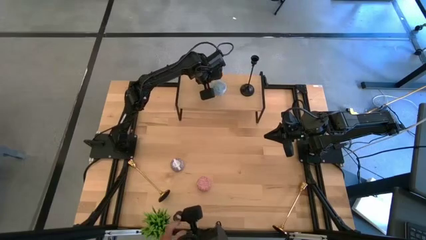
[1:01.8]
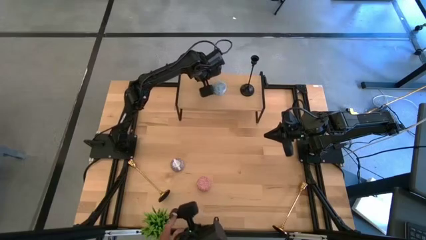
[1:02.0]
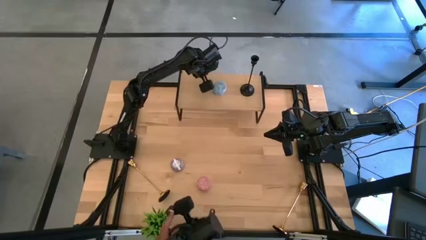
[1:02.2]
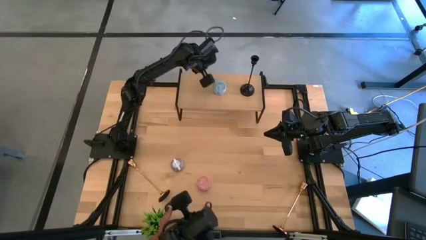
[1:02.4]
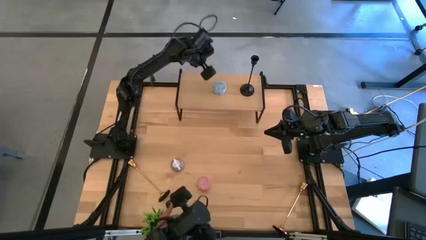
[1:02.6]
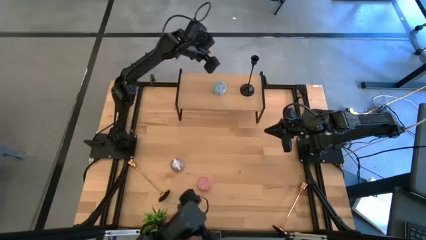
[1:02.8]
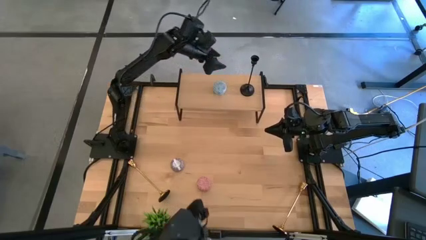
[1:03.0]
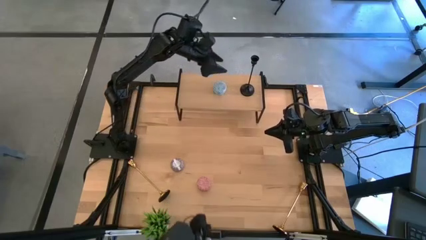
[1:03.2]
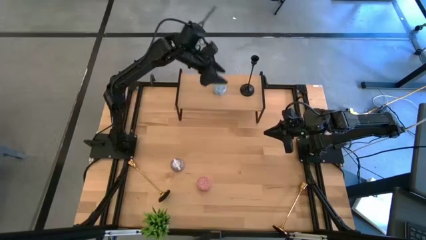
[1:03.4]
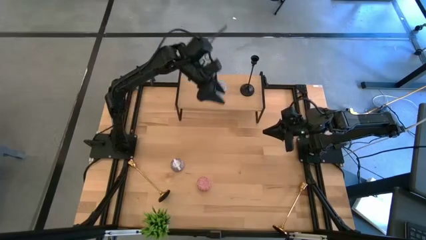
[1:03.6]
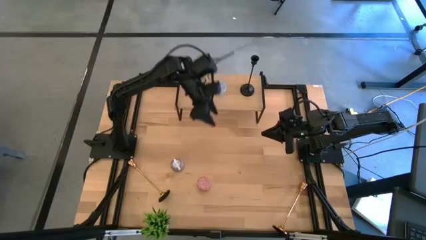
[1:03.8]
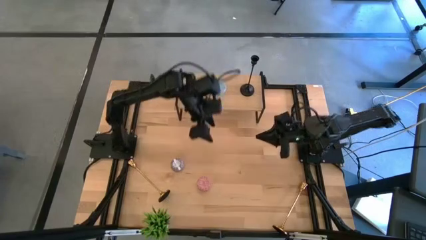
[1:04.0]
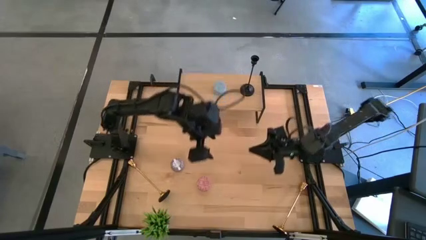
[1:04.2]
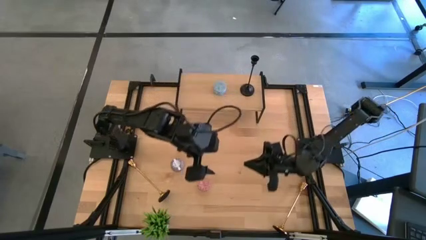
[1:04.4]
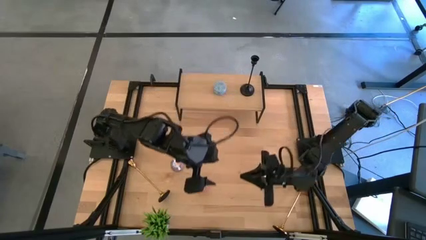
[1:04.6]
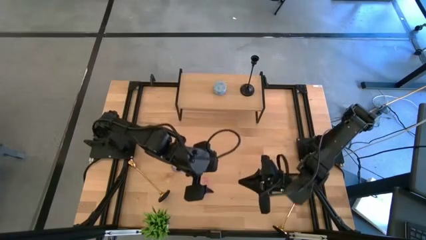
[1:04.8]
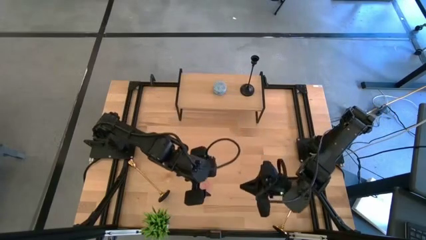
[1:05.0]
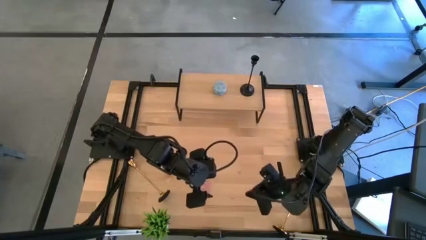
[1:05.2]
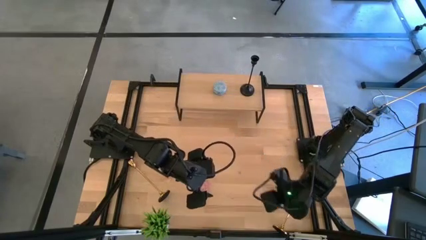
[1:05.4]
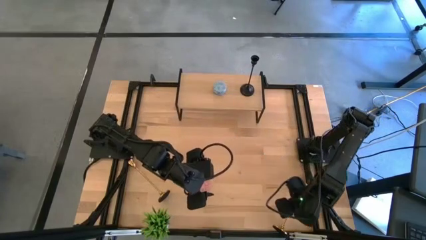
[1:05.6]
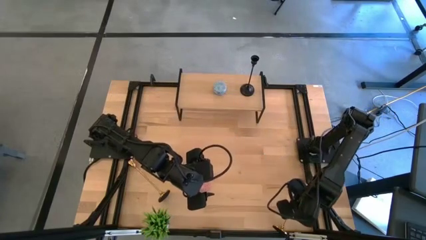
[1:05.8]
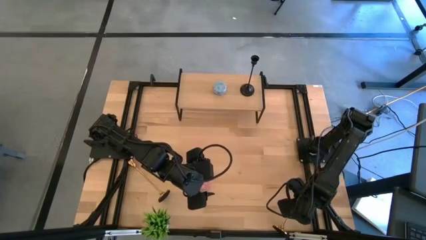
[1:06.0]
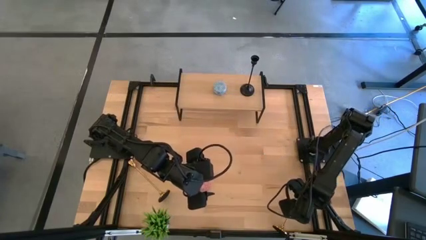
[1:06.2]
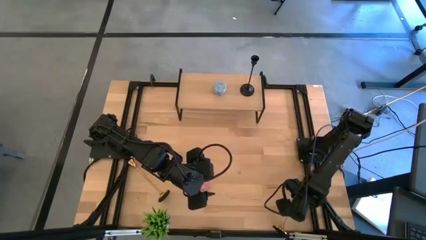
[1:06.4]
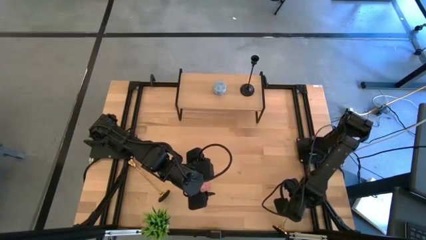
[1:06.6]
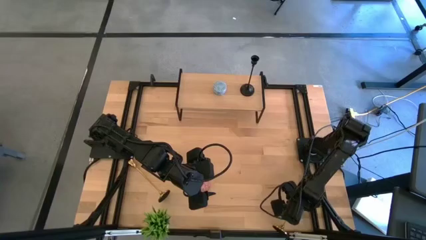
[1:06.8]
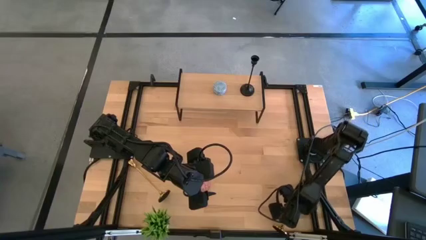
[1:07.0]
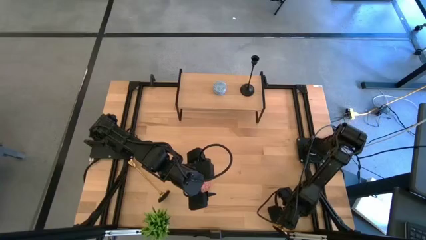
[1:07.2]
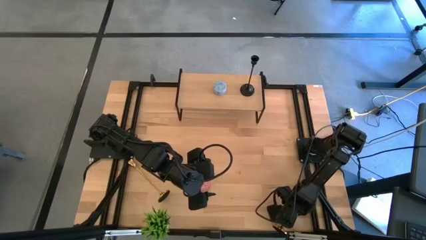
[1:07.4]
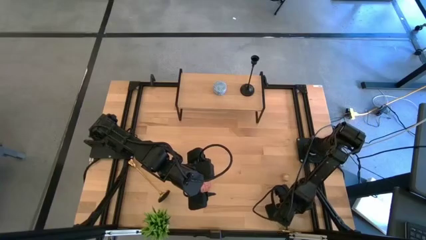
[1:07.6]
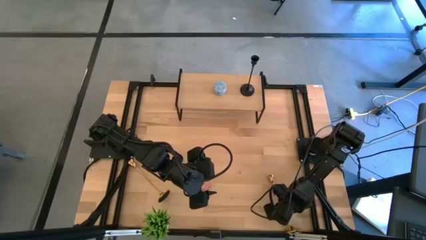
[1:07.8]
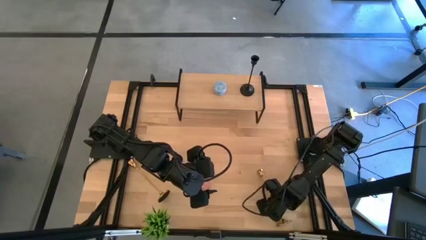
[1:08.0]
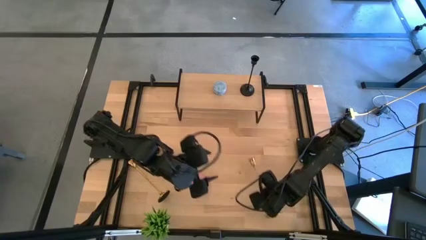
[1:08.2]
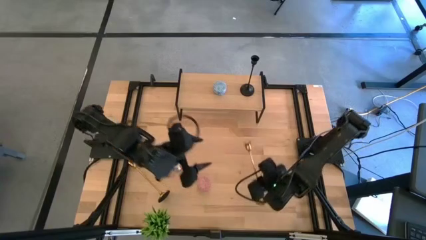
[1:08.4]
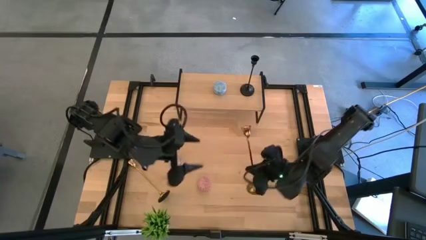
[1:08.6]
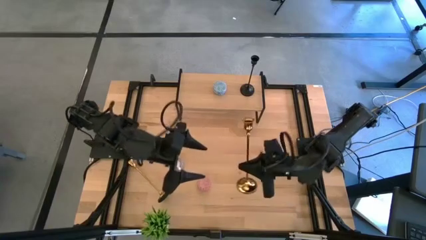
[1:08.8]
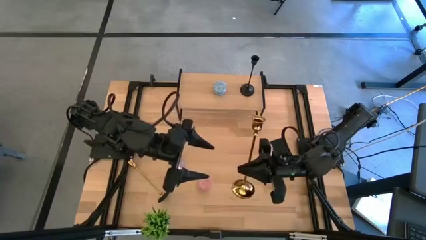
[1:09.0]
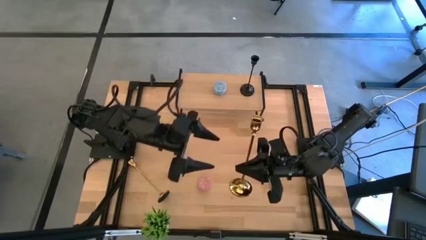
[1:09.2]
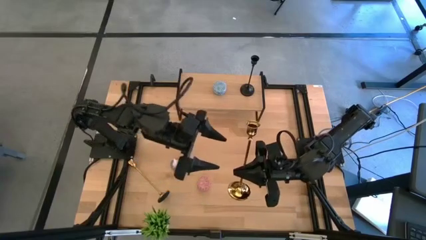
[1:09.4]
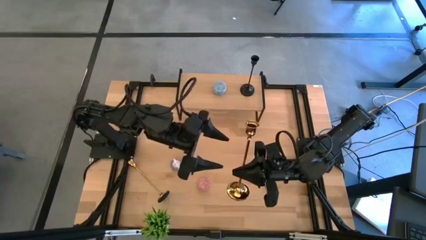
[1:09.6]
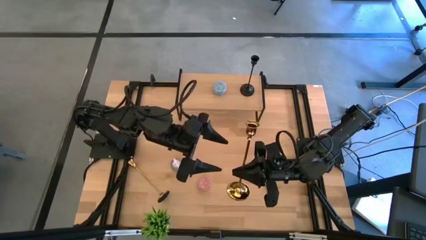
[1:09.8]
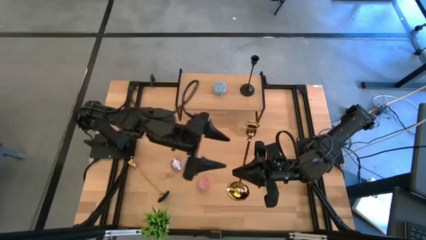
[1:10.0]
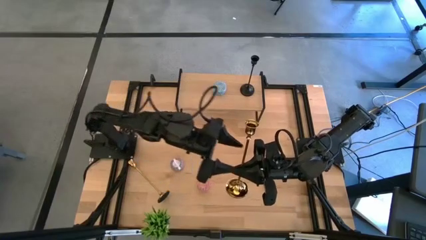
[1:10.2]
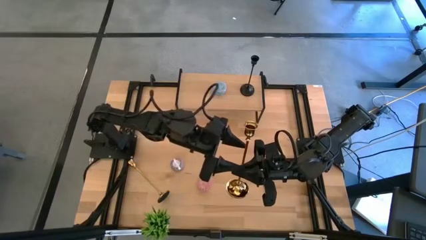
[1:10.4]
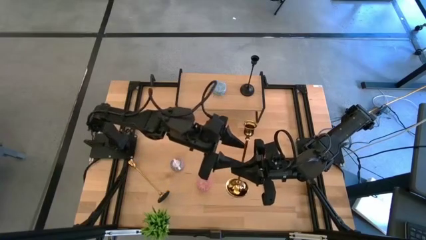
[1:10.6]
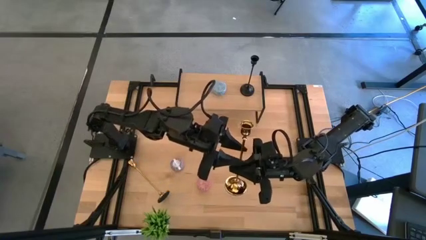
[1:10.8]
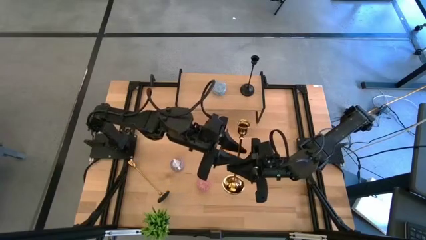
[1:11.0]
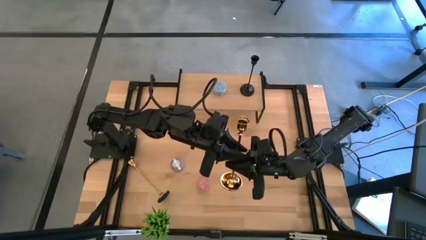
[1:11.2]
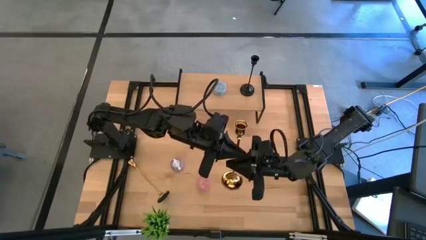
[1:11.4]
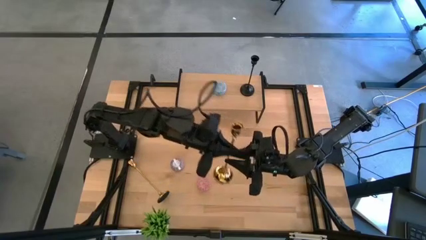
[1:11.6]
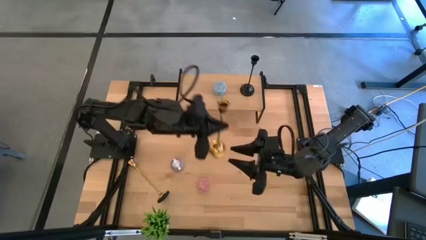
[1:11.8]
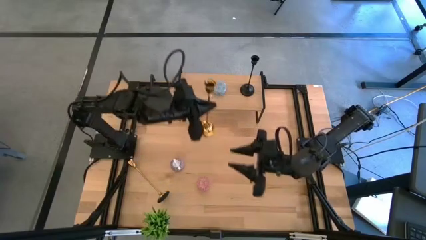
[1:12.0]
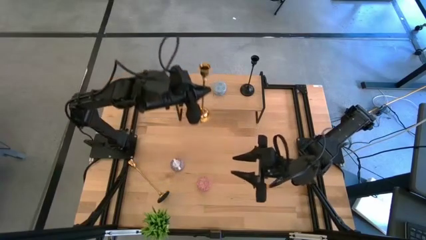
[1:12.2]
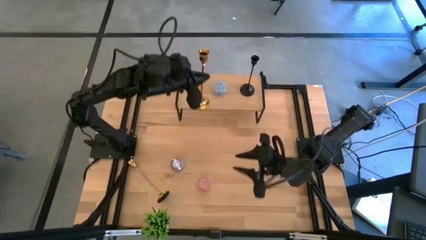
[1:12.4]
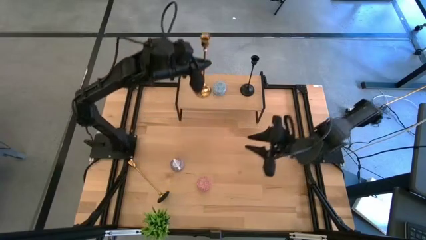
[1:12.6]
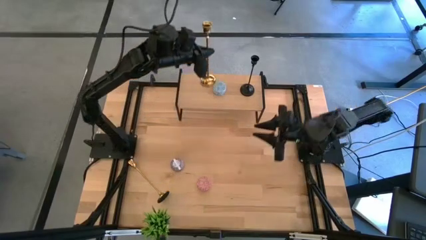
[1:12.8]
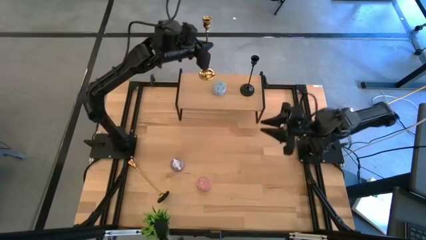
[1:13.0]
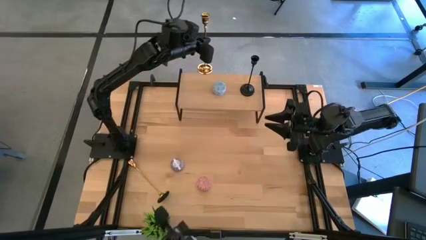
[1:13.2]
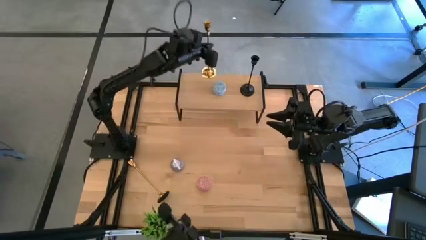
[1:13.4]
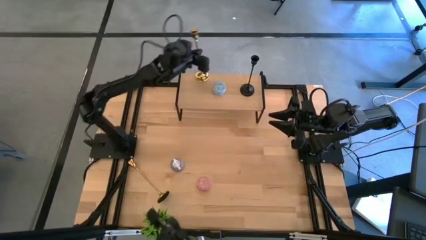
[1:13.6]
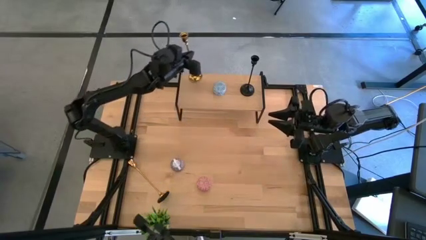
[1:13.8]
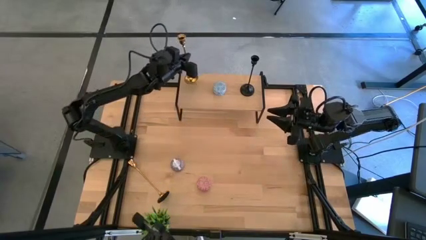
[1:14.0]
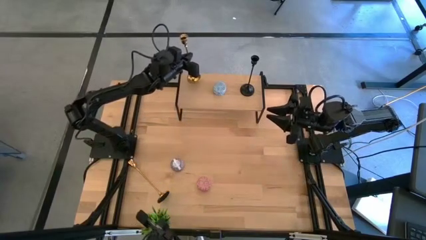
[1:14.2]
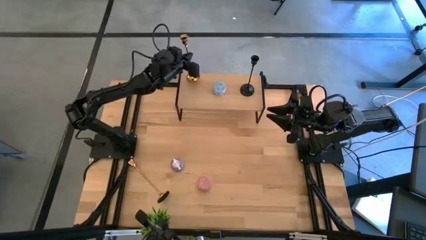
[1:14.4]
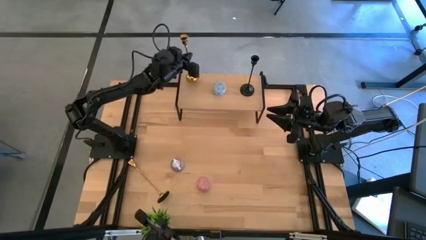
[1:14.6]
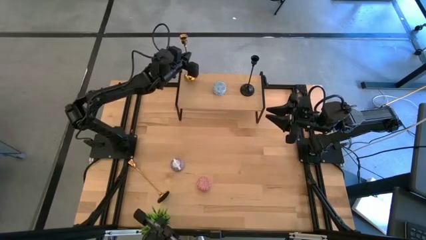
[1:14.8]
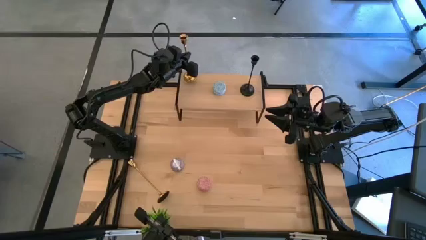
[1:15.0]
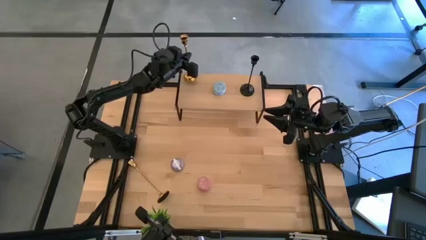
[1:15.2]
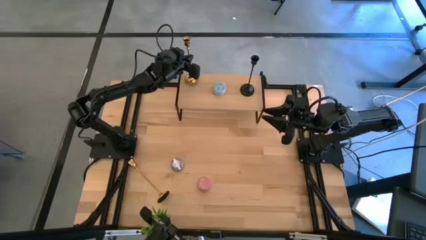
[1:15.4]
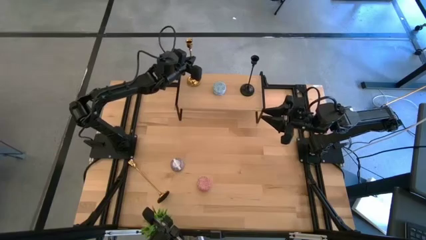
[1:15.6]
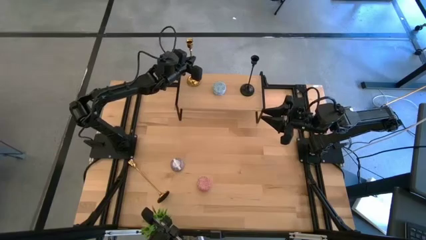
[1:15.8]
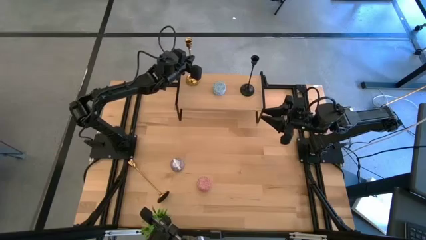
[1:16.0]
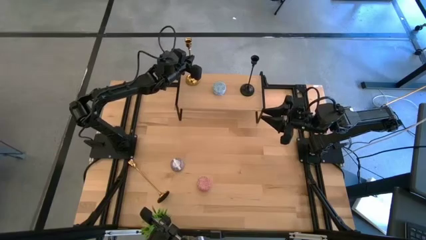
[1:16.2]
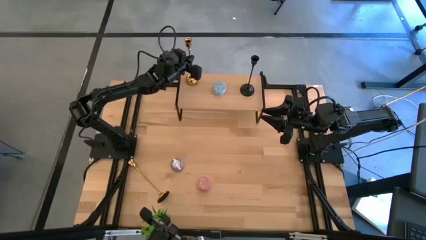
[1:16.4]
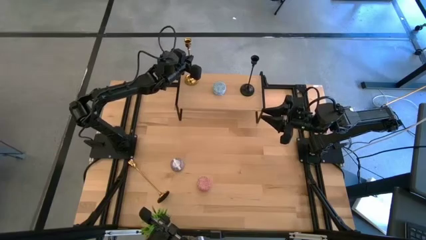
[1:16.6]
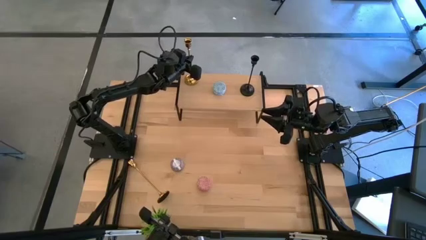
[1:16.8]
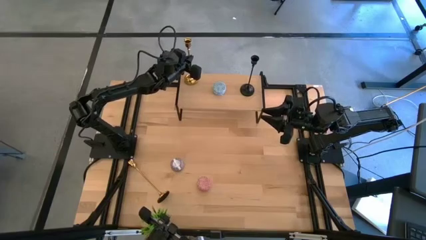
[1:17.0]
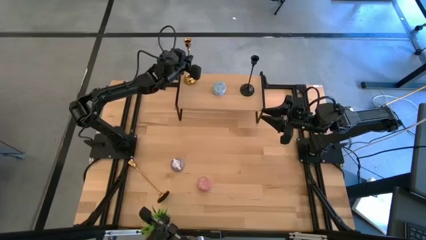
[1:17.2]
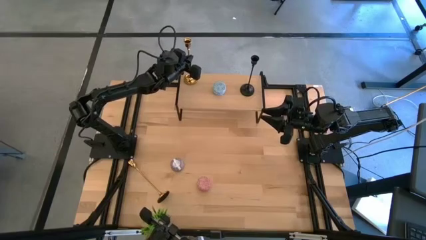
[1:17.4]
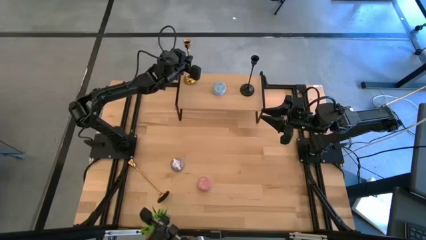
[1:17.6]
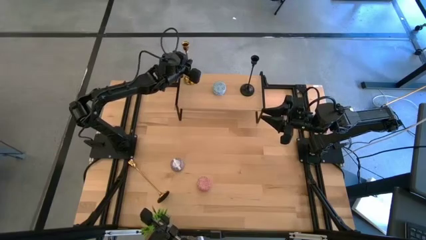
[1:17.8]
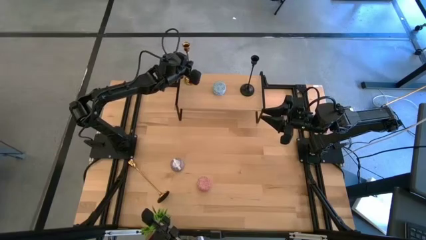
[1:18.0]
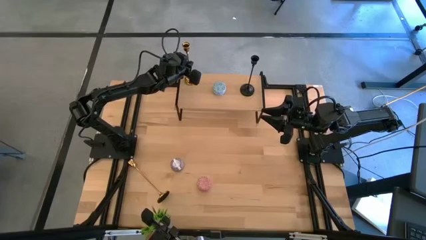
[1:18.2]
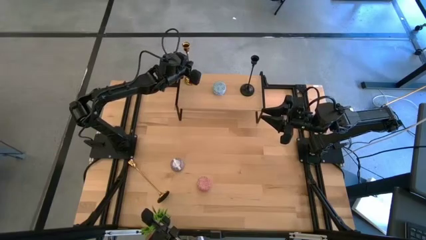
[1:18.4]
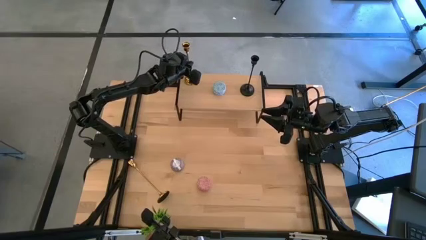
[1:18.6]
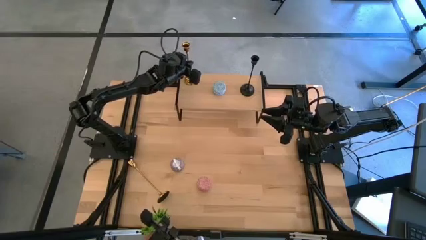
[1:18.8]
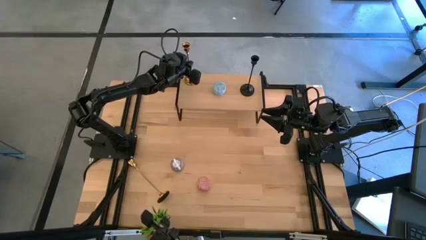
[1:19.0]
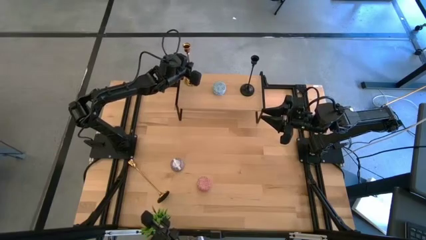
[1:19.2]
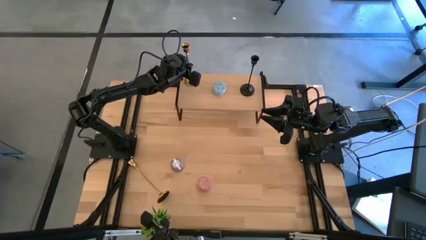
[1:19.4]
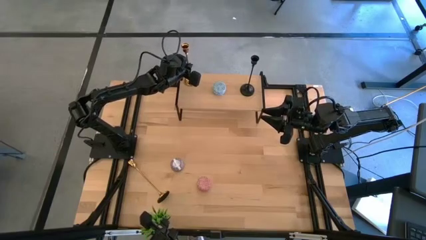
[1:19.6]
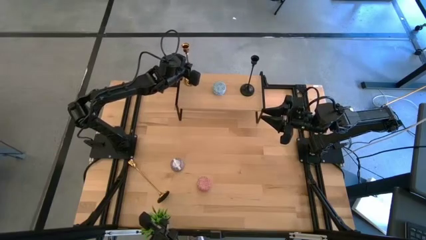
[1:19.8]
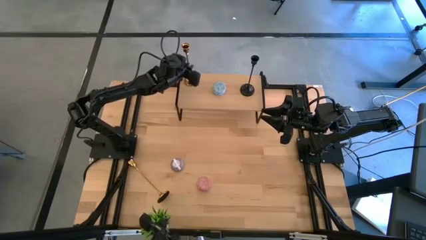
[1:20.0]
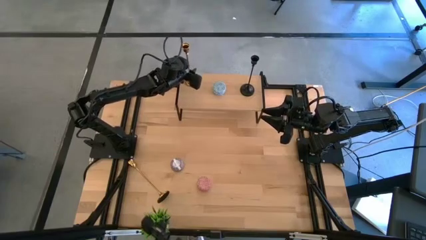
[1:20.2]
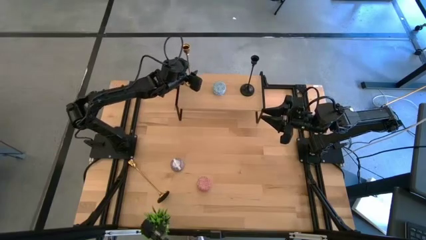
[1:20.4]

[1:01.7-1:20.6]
Task: Pick & Place candle stick holders
Put the right gold candle holder on the shelf
